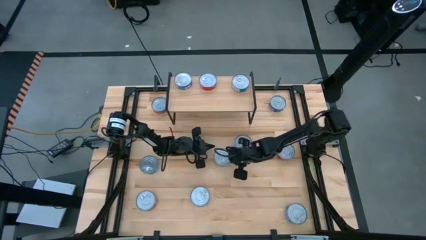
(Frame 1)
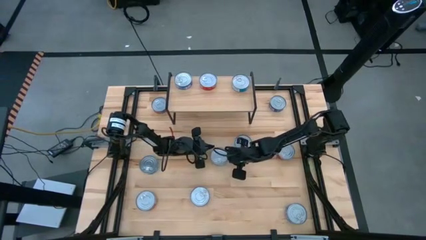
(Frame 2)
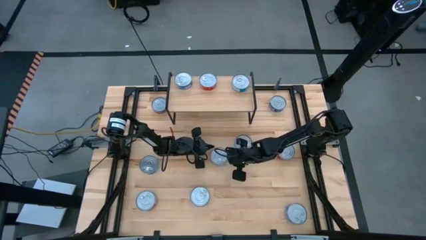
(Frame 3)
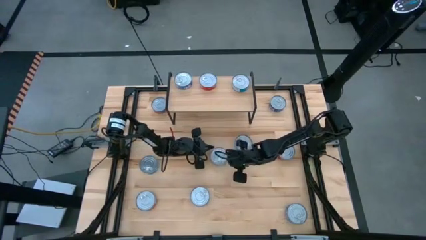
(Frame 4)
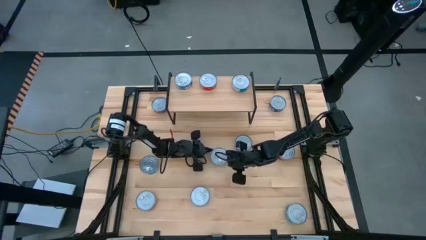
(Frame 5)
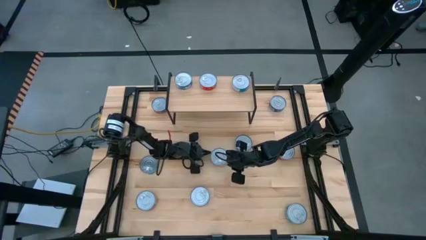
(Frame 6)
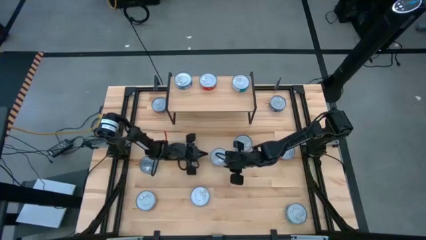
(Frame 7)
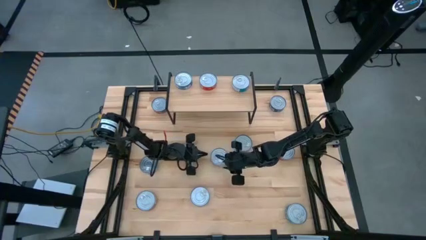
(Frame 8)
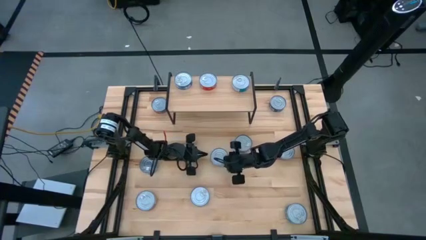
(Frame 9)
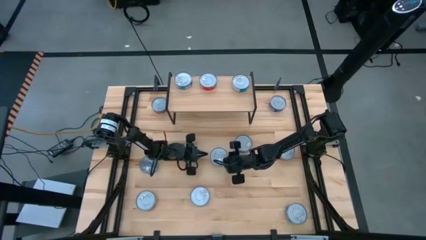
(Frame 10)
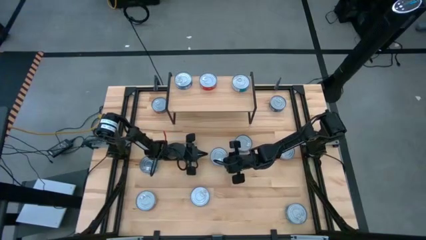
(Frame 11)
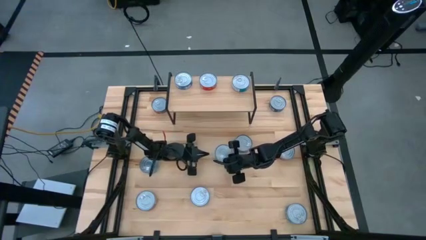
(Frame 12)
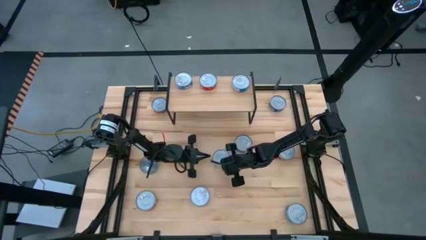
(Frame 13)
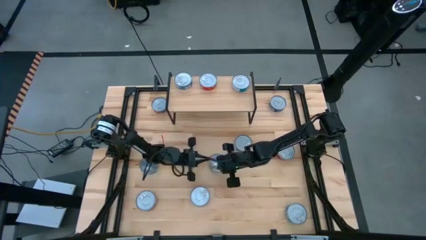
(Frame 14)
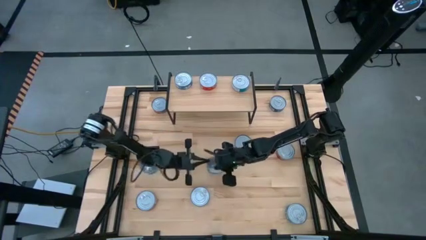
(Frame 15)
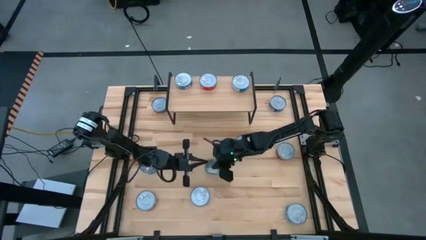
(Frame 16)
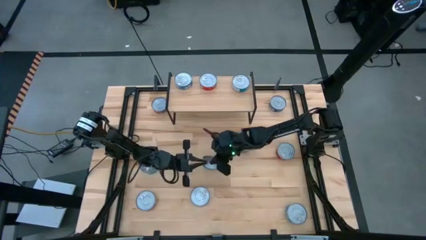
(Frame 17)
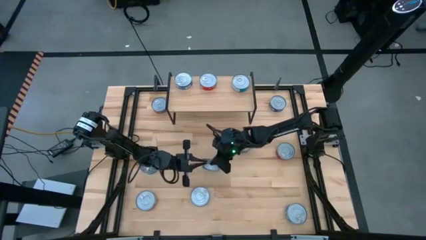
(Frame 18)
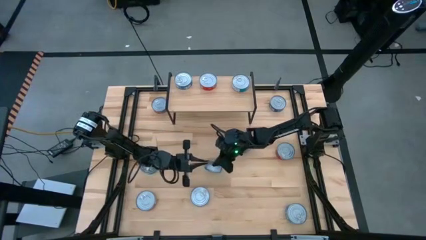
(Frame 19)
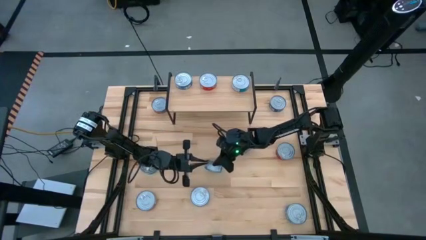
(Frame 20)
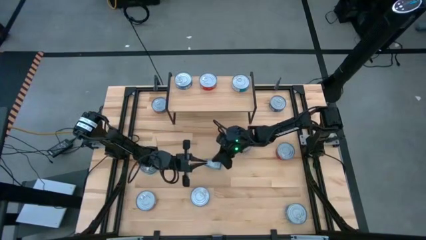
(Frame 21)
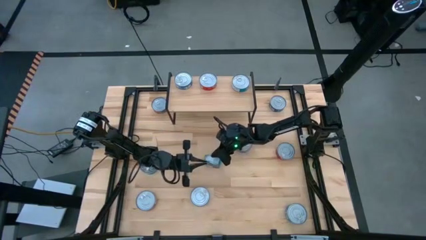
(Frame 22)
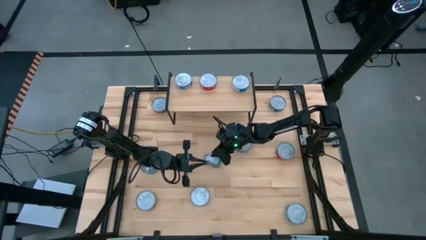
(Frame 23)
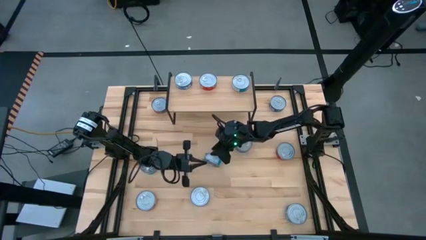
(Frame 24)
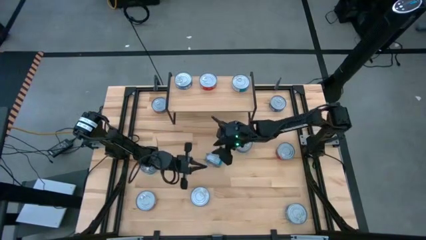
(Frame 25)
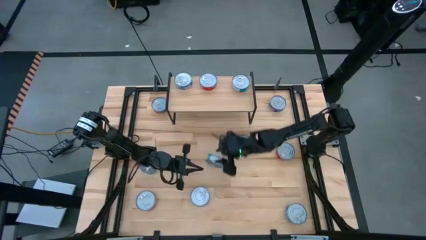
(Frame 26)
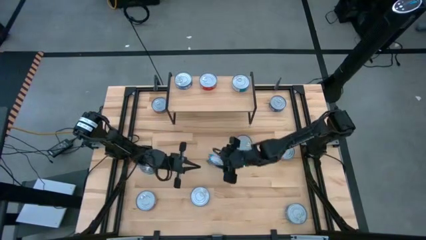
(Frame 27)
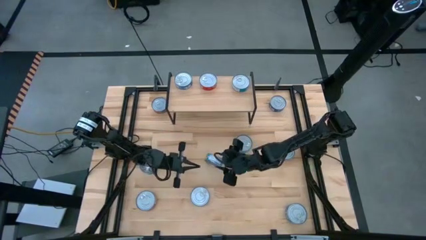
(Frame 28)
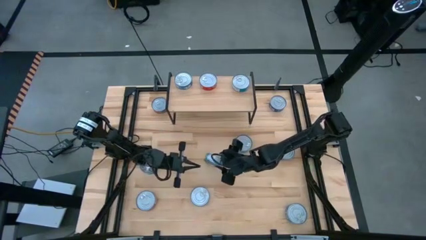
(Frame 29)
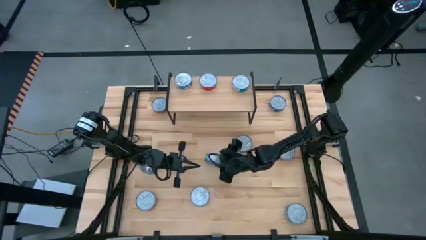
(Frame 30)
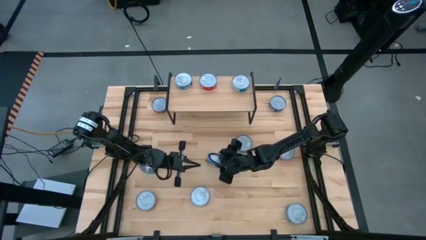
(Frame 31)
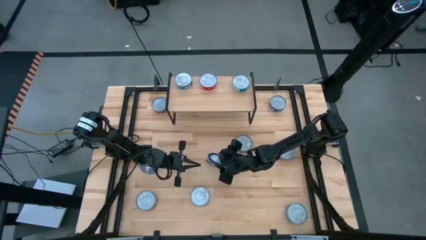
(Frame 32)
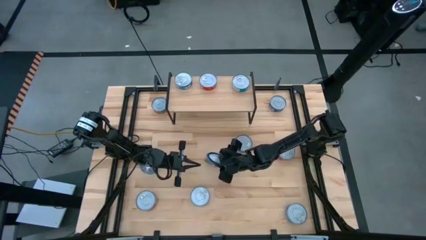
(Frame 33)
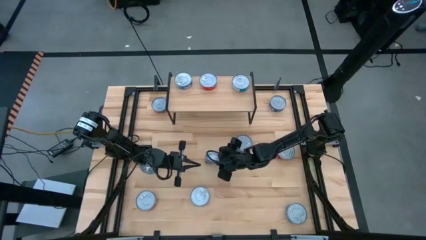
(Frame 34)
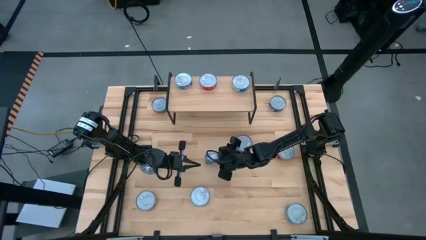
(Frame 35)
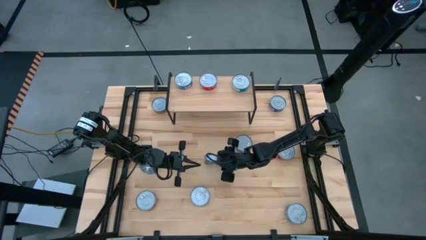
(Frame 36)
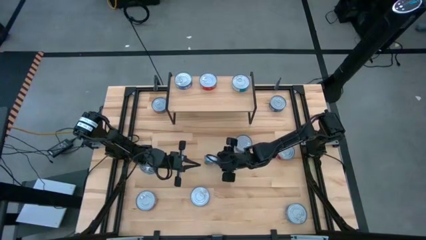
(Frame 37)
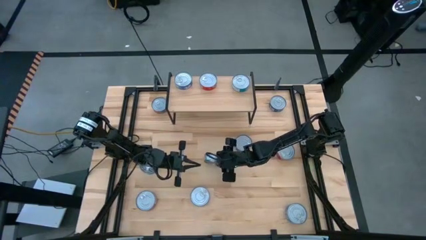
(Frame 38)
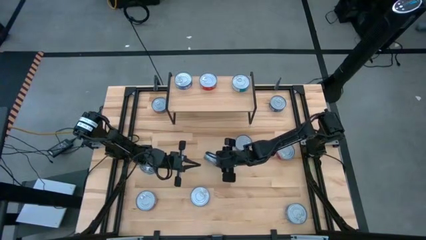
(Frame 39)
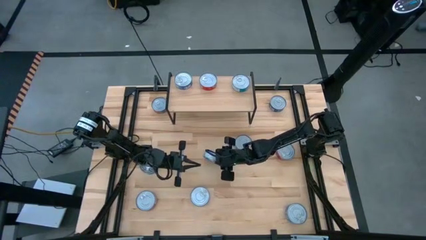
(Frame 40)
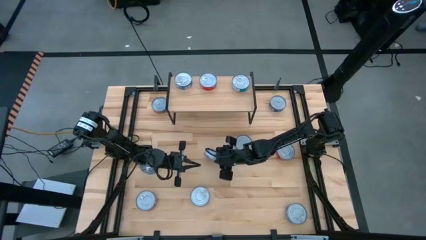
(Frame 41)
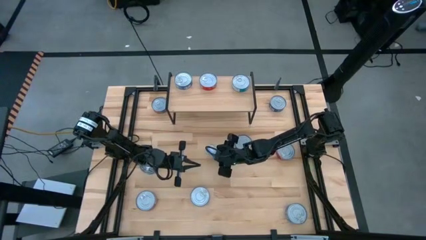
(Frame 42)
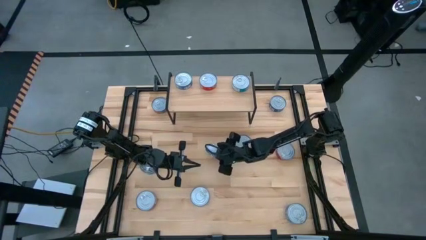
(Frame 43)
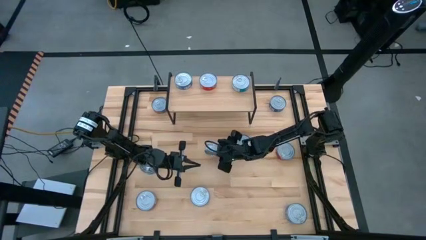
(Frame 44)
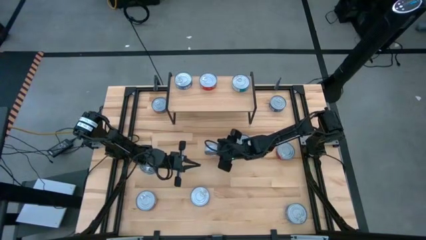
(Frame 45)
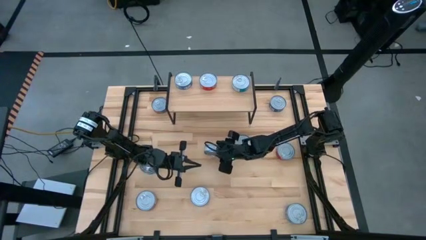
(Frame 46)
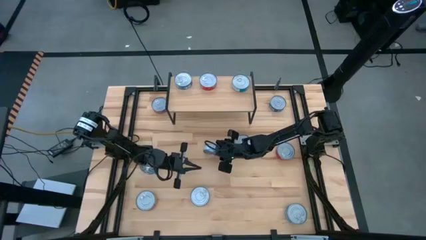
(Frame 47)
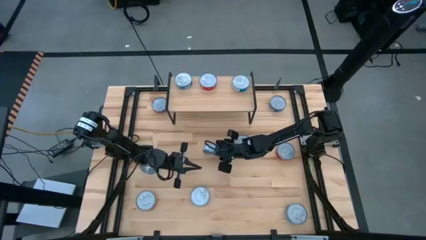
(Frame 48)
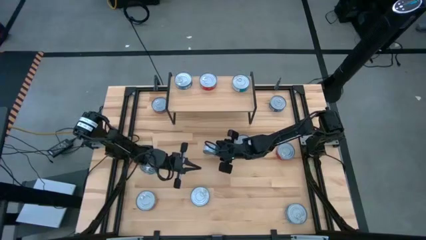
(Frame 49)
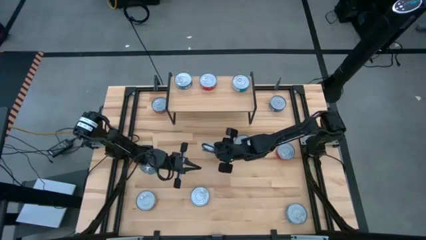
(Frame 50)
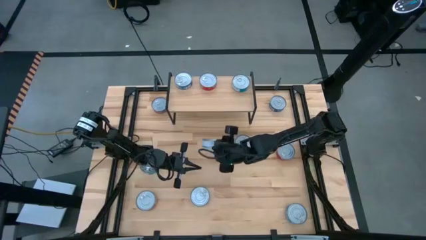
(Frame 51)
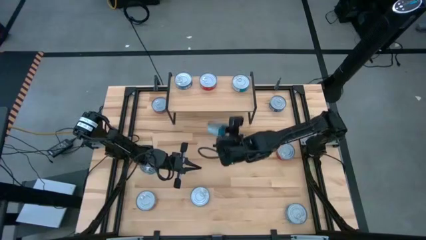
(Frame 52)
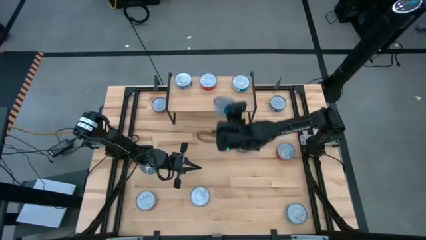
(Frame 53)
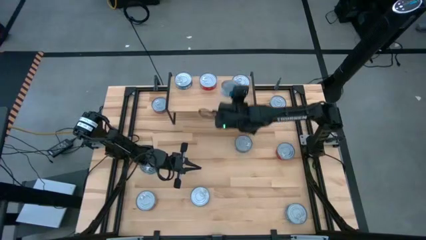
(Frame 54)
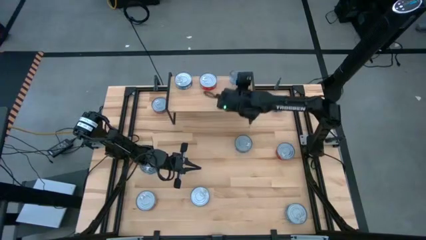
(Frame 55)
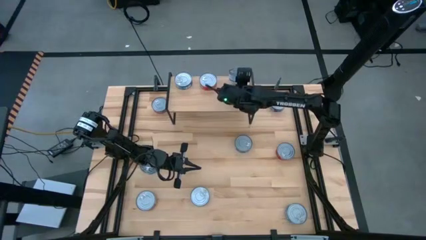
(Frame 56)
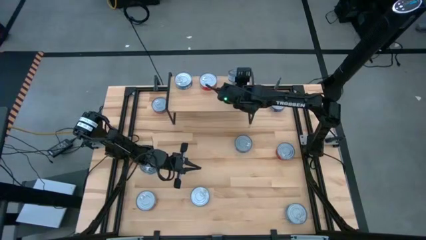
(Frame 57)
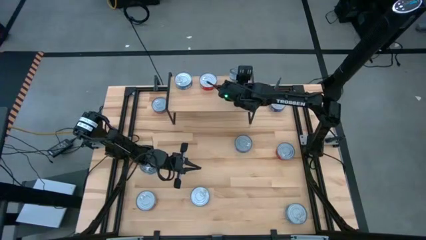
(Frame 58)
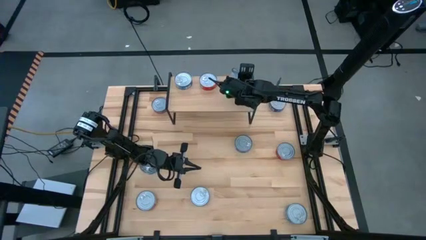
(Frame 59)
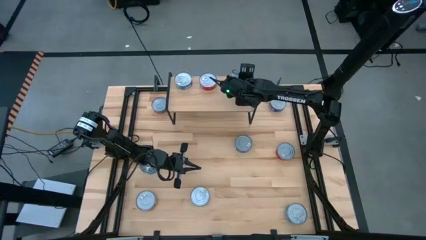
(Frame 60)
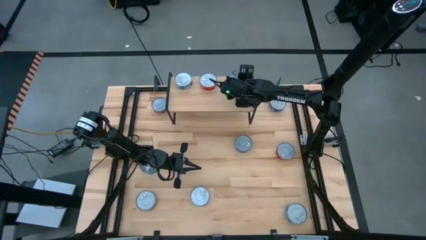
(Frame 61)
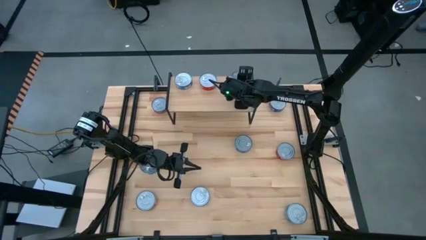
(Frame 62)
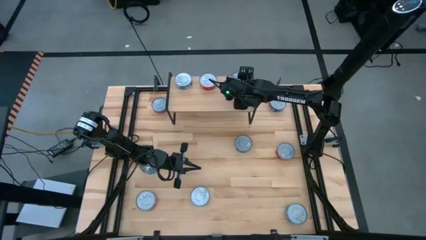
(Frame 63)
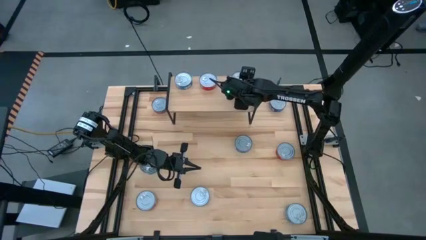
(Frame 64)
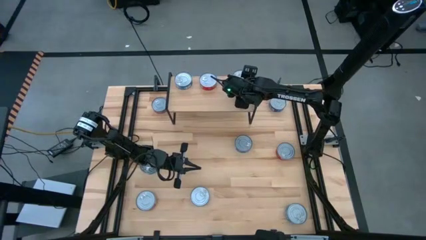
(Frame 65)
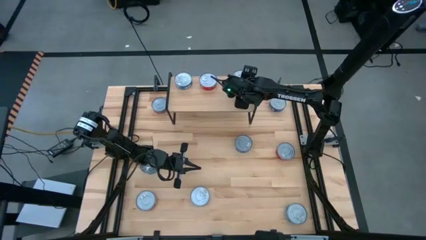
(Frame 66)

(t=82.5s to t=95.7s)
Task: Stack canned seafood by type on shelf
Stack the yellow blue tuna can on top of the yellow blue tuna can on the shelf
